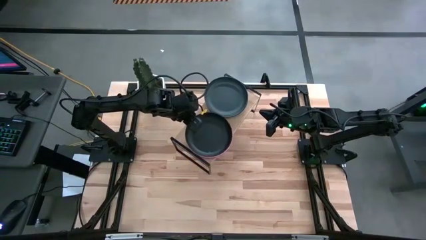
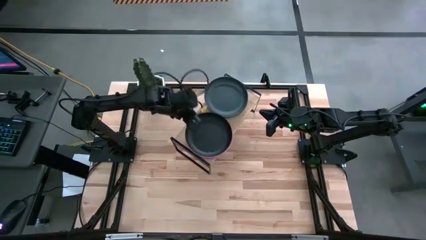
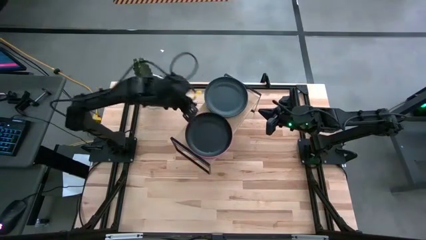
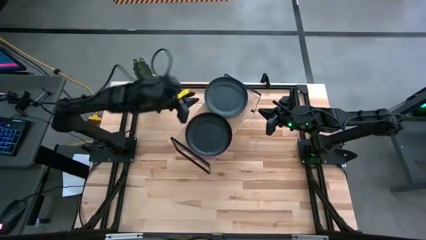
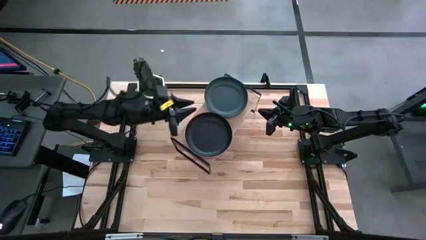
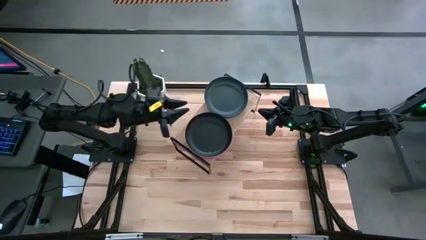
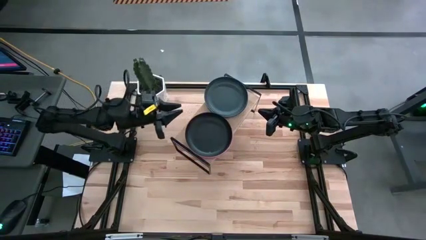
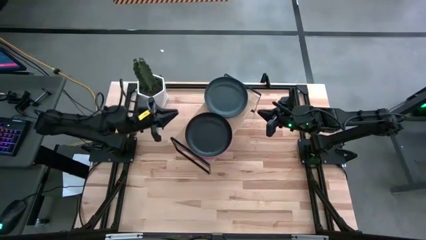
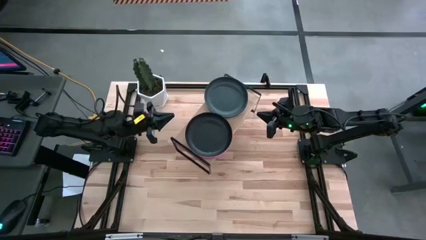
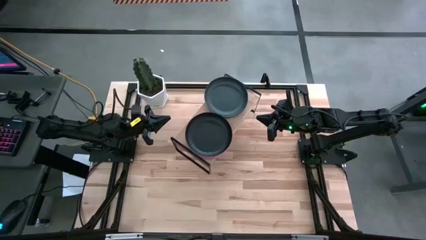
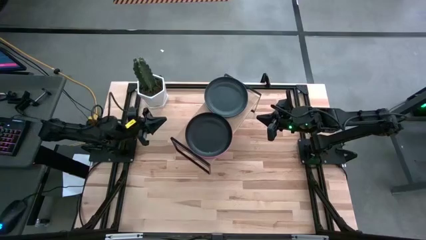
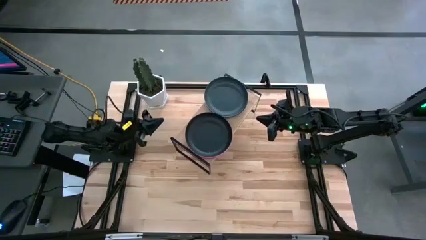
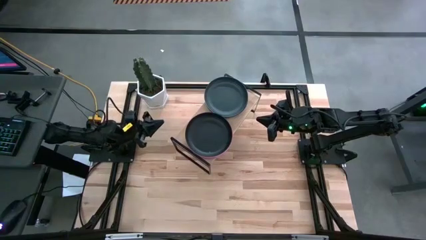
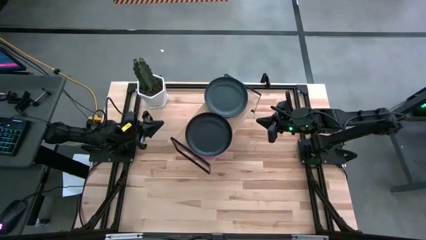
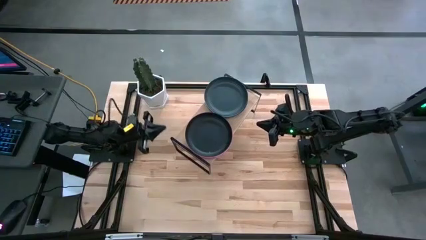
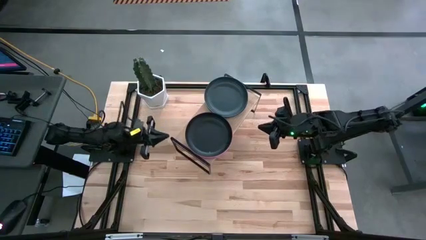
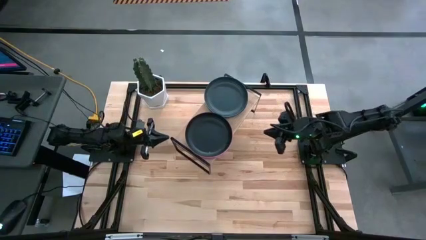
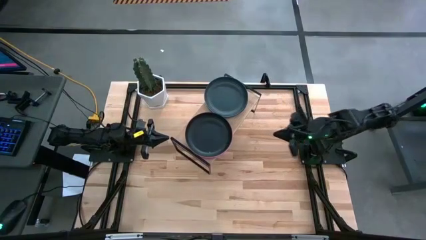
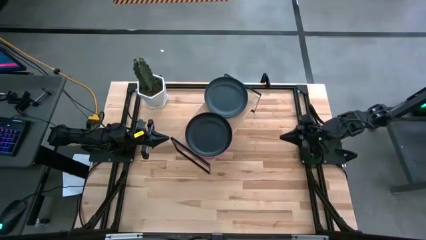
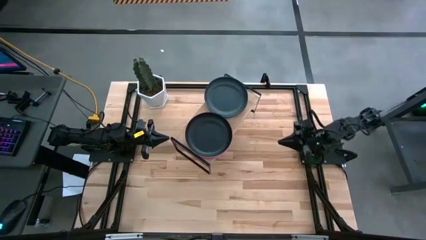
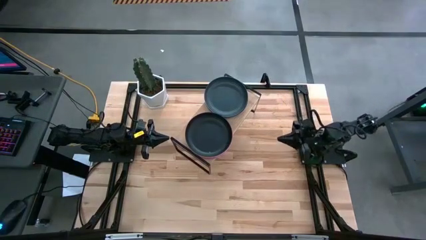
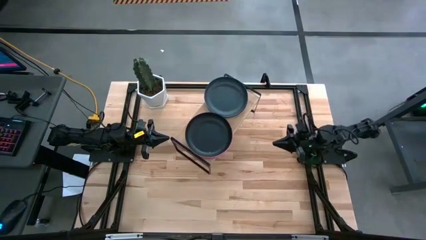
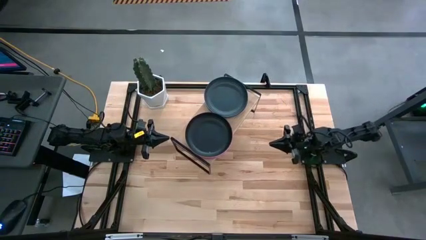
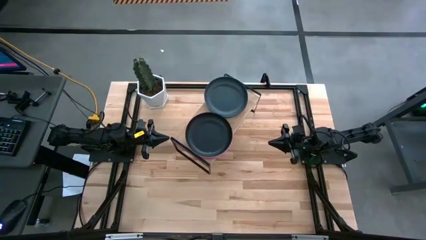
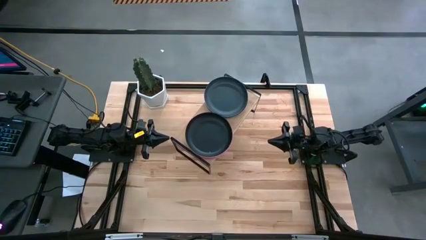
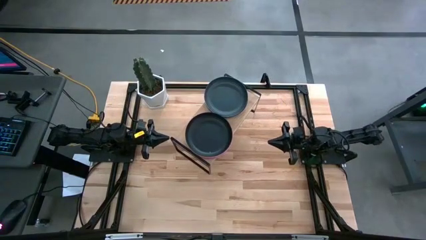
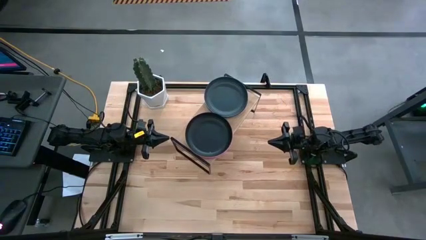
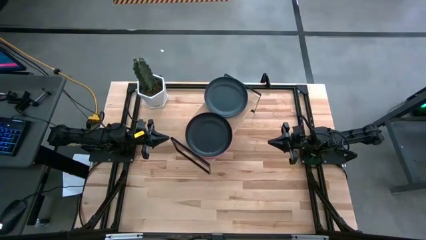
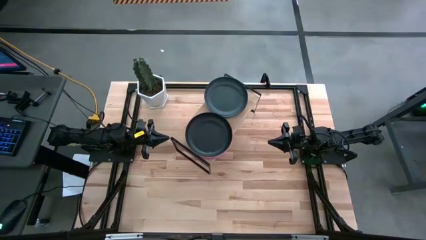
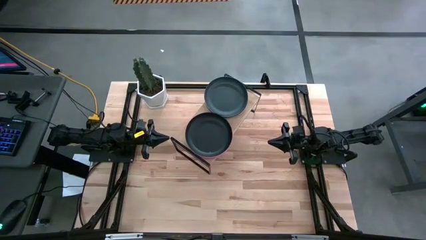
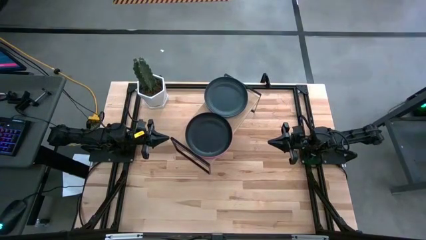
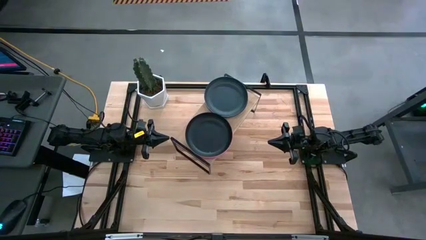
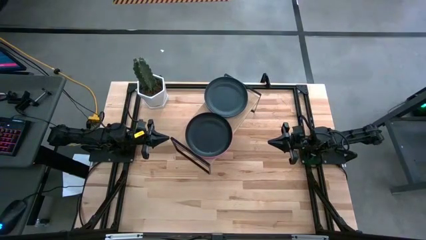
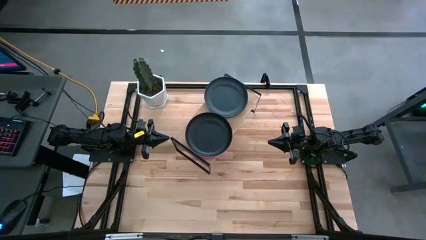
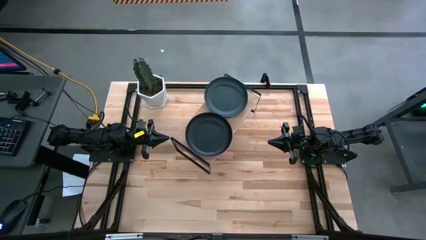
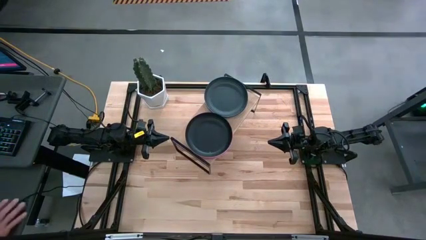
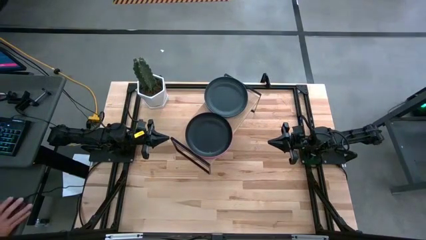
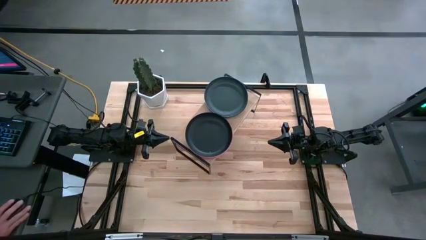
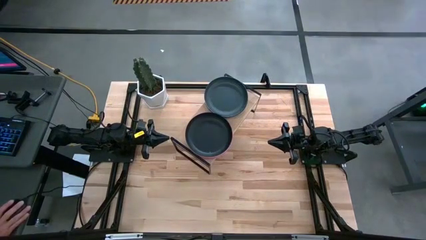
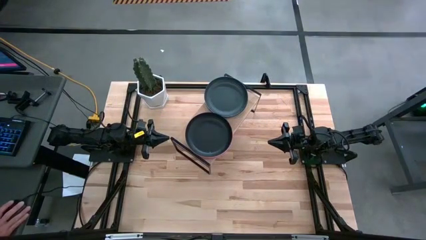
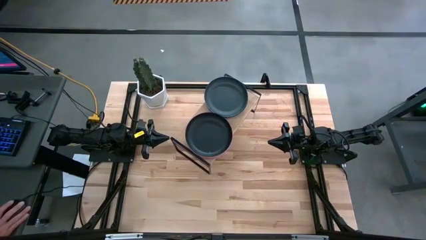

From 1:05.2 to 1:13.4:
Task: Place and stack plates onto a shelf
Return to Home Position

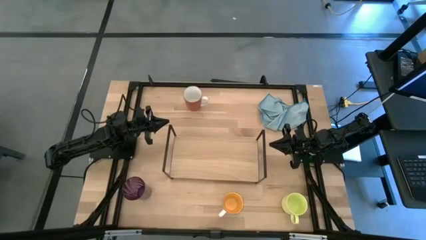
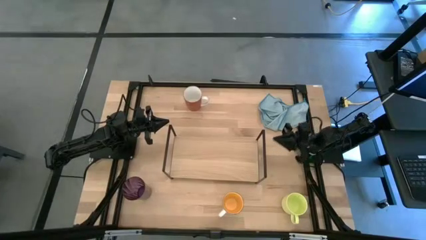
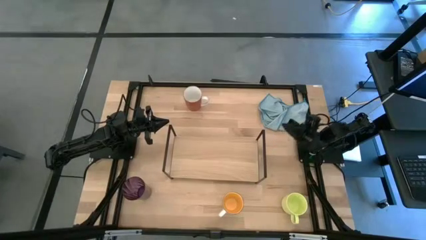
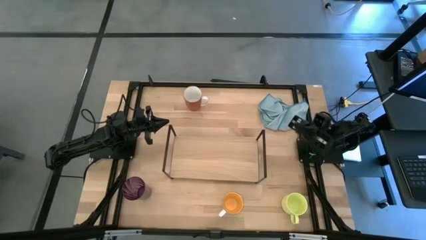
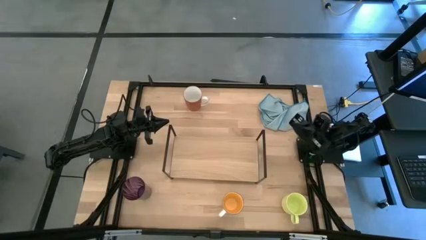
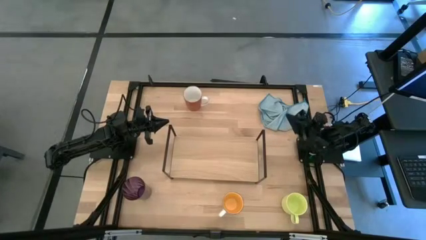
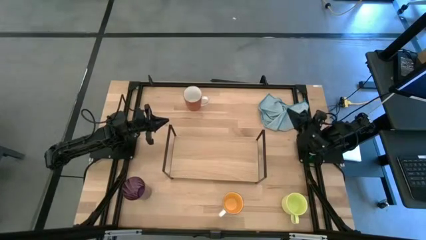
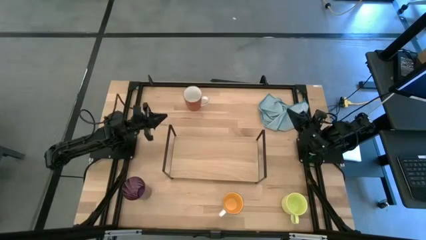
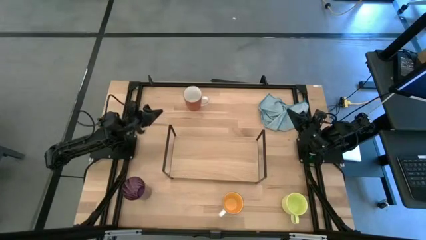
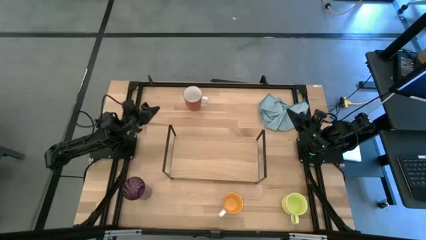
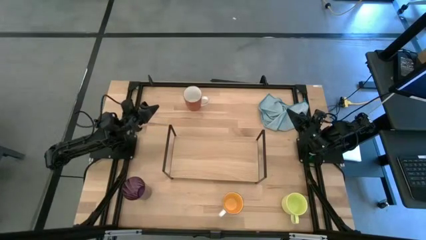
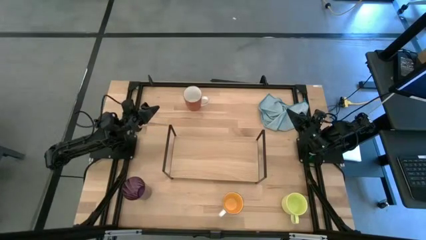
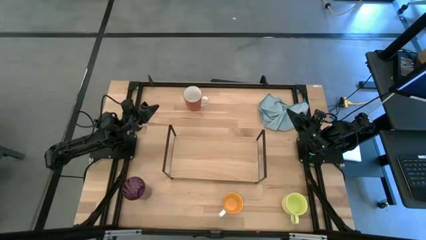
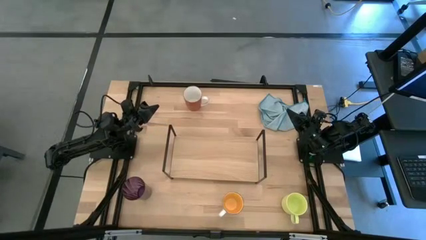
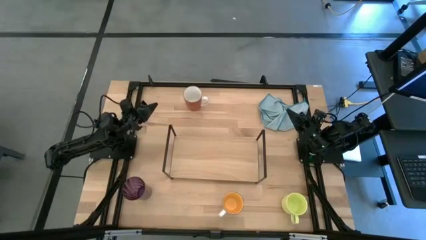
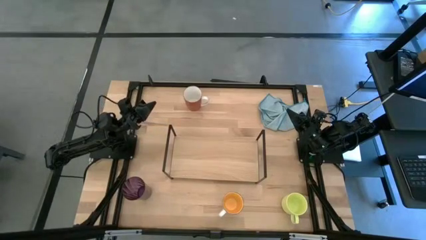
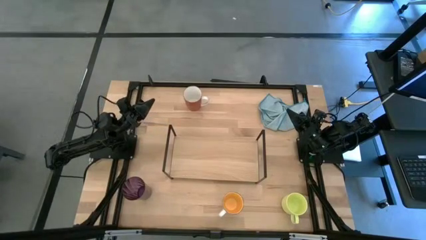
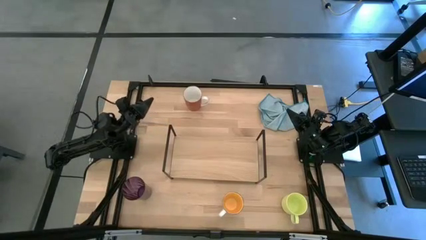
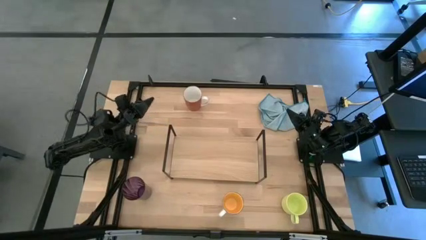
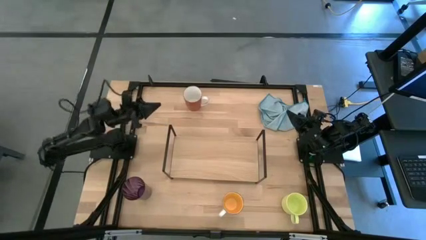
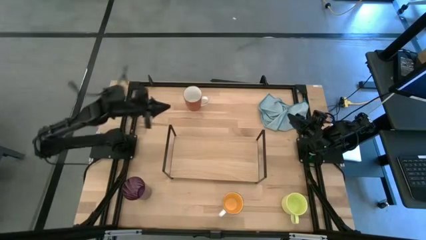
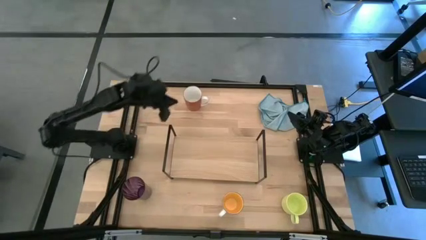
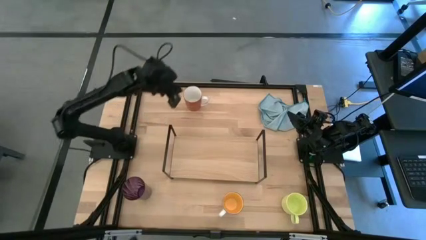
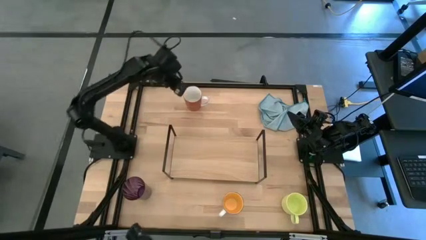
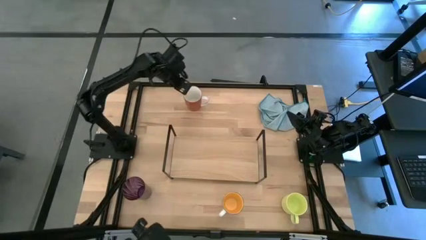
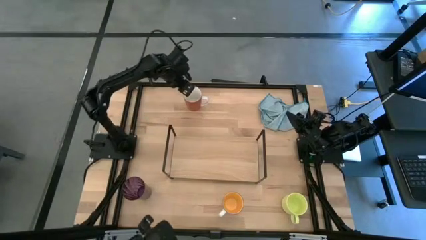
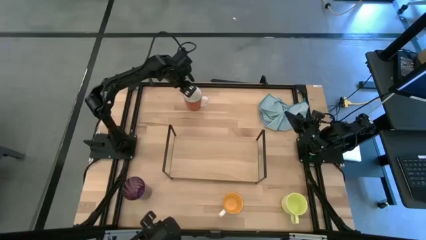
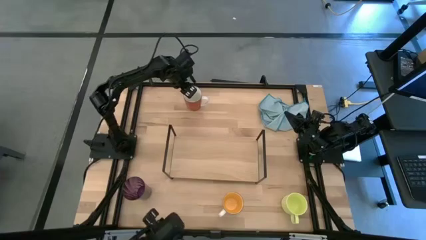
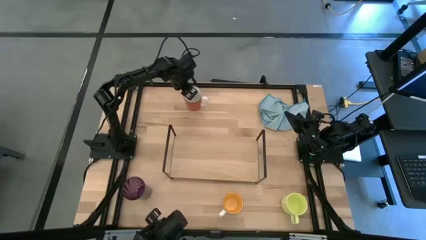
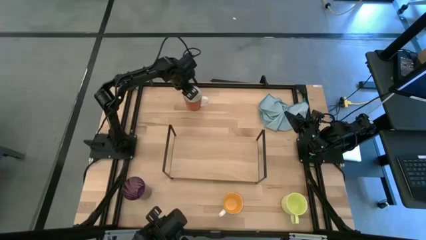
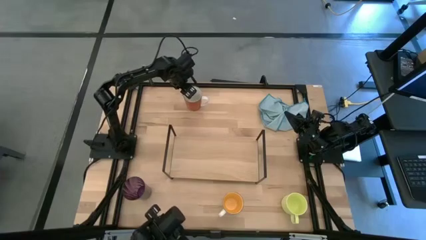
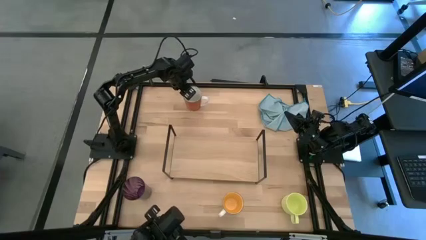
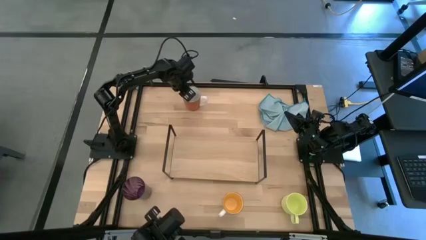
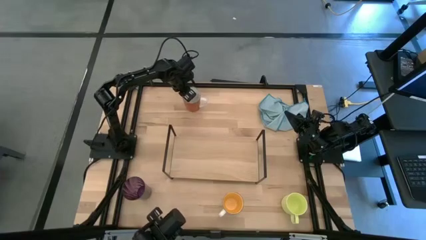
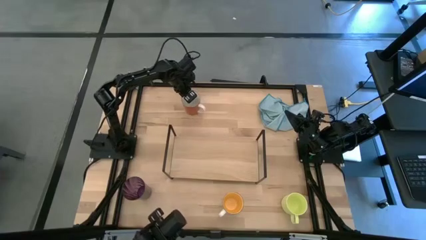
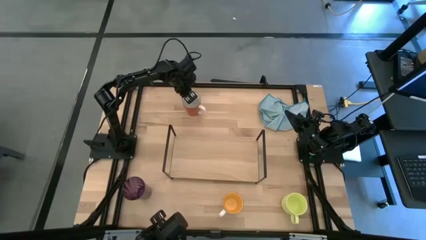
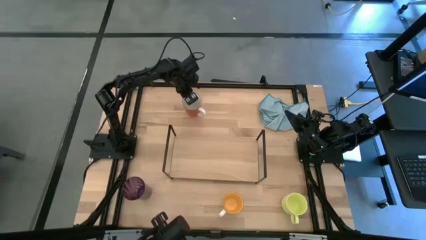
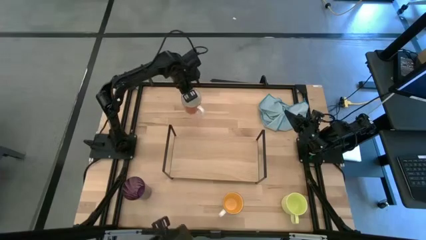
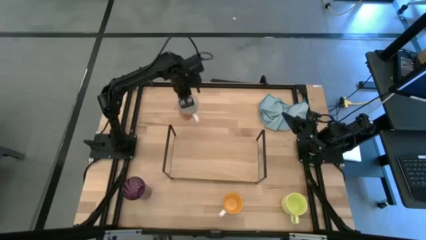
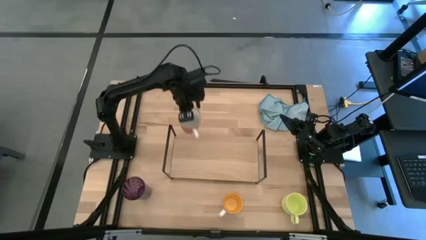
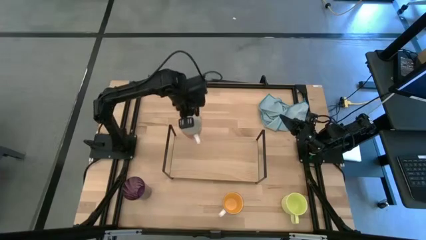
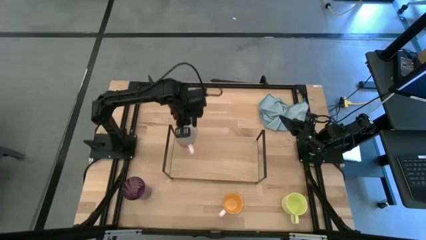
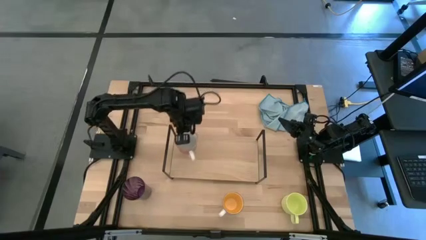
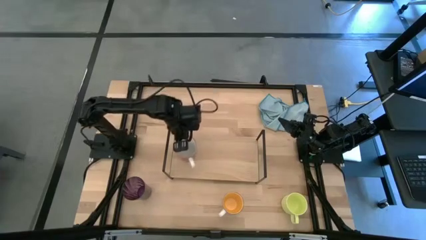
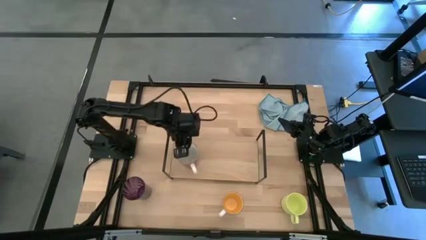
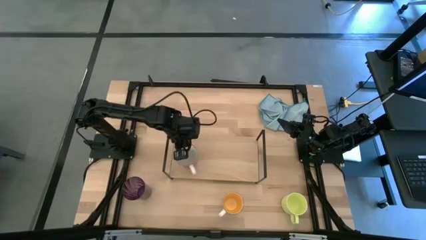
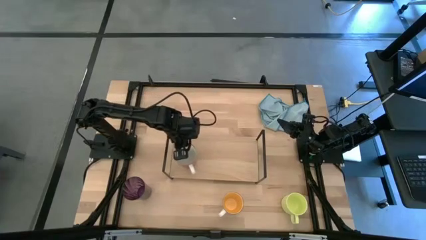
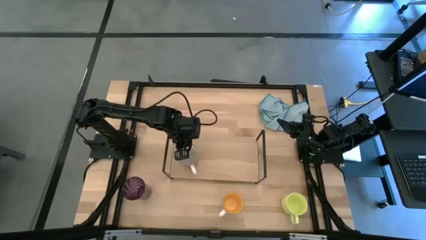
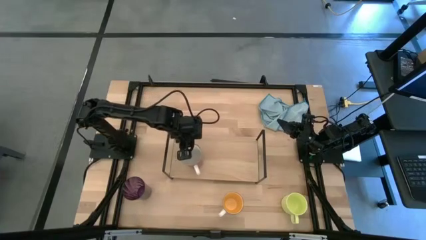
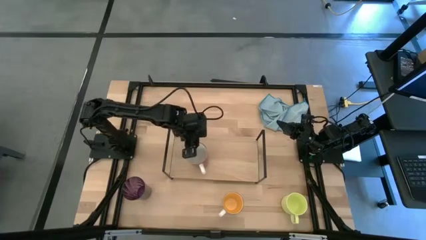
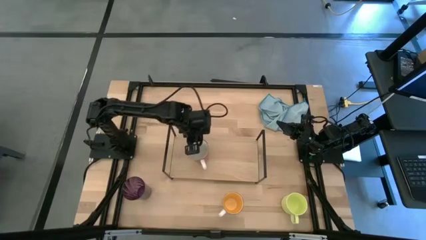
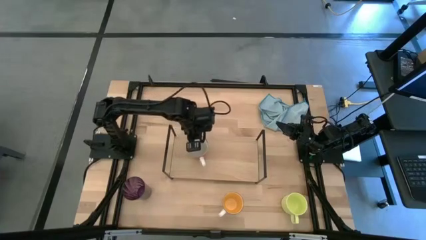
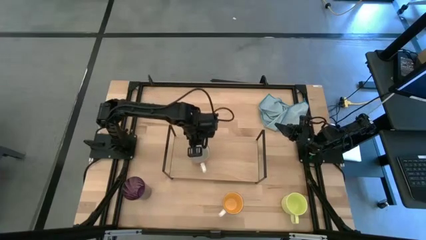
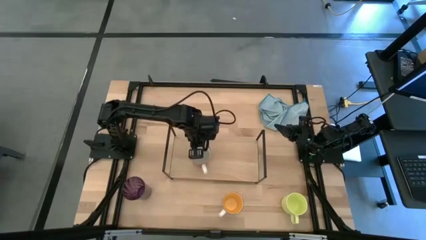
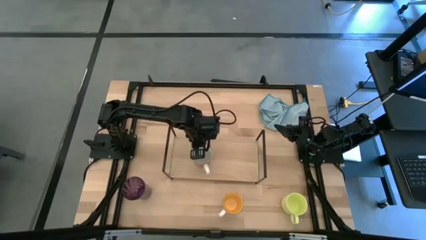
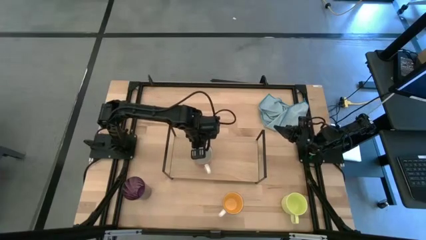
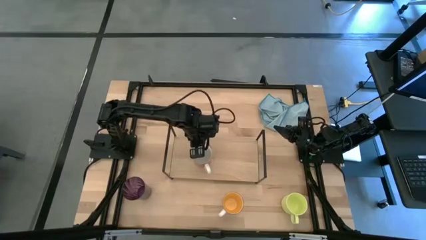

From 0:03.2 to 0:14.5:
Task: Stack small to large cups/mugs on shelf
Put the red mug on the shelf
